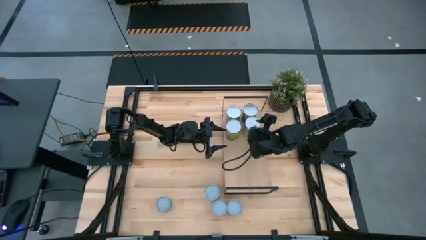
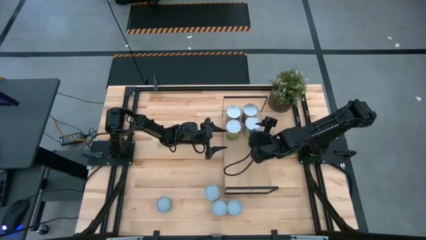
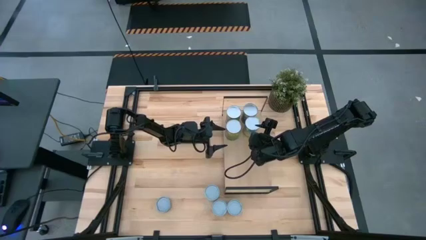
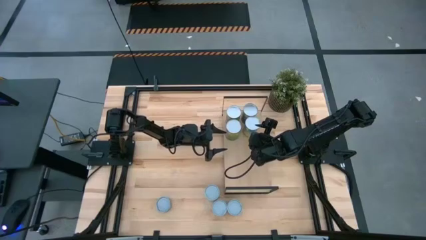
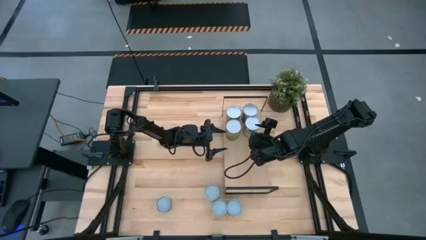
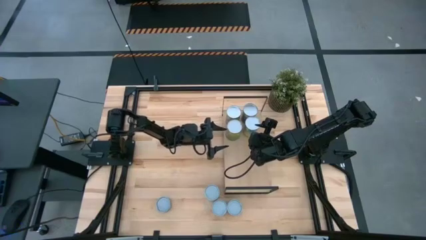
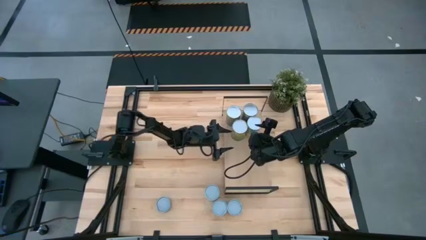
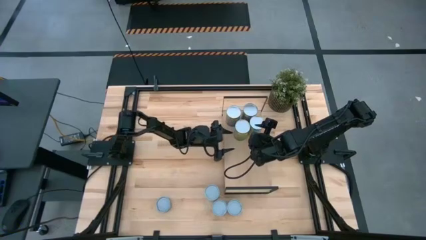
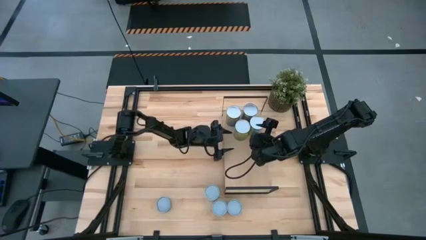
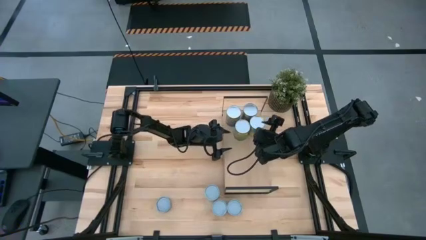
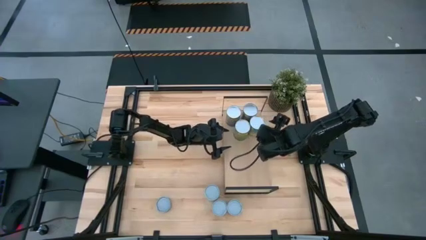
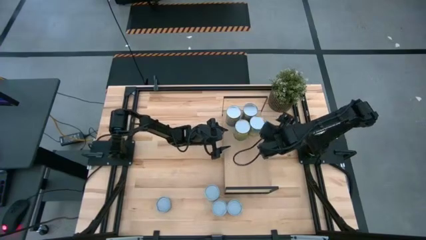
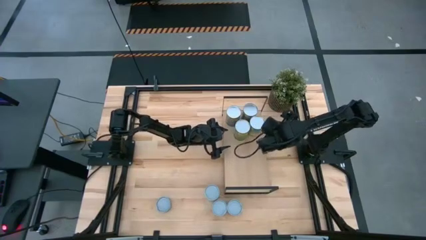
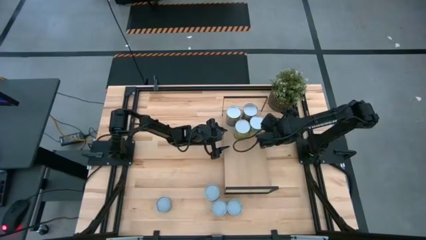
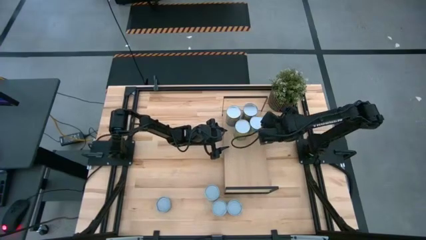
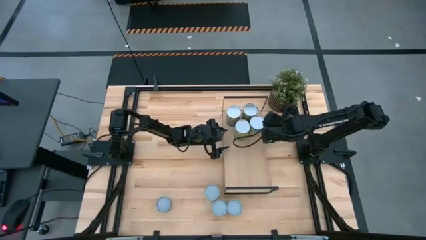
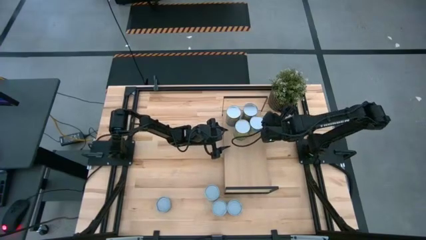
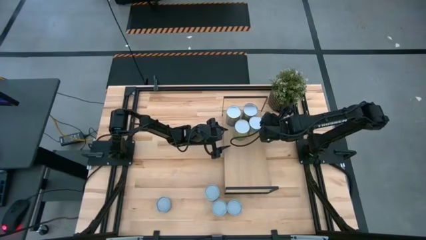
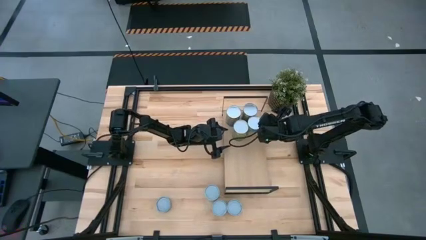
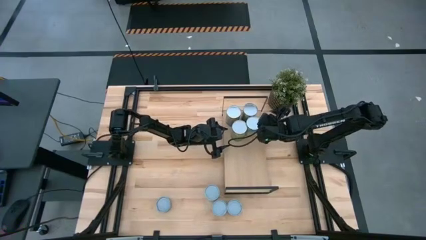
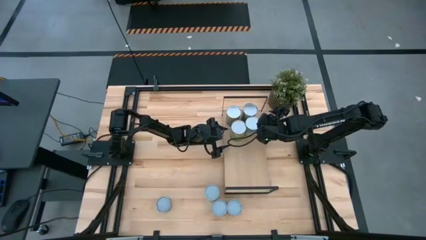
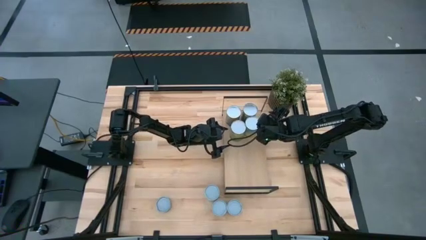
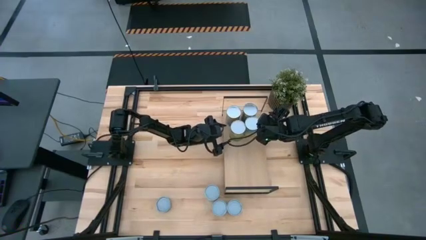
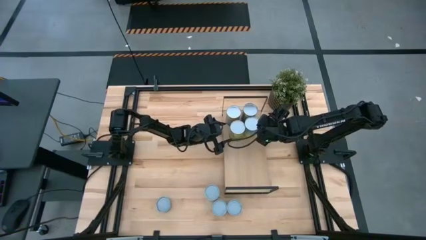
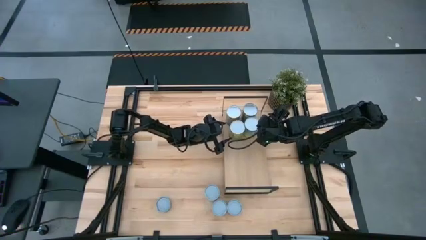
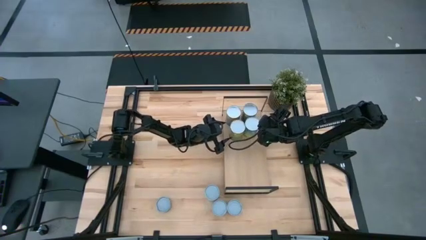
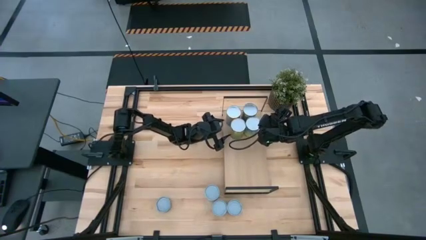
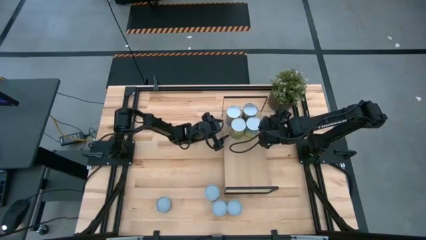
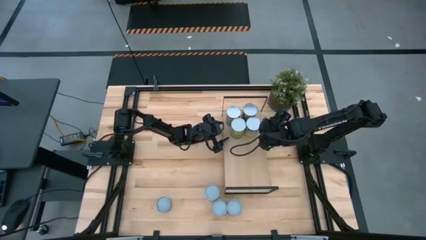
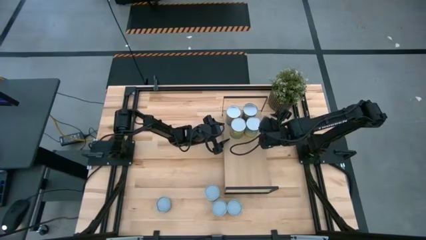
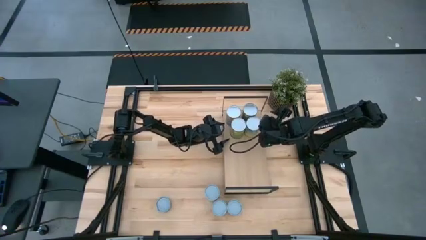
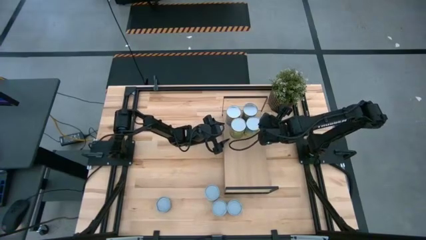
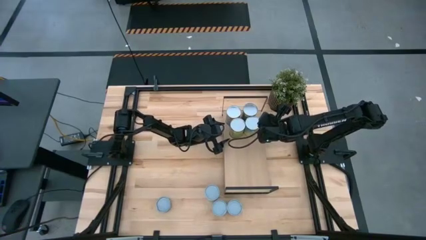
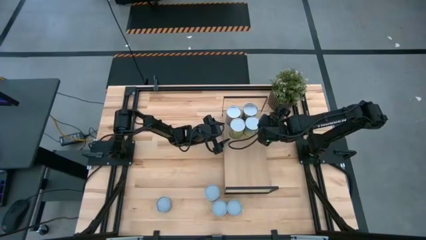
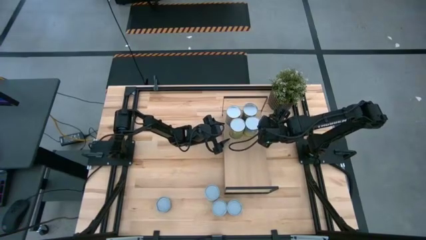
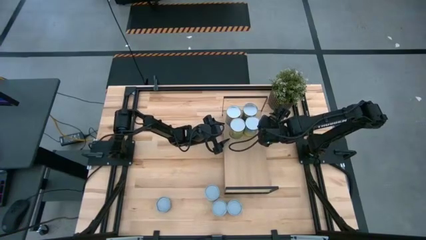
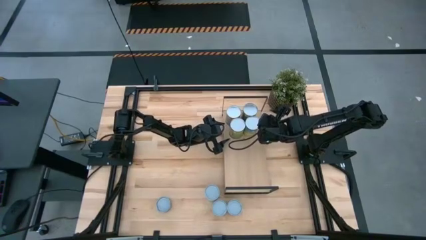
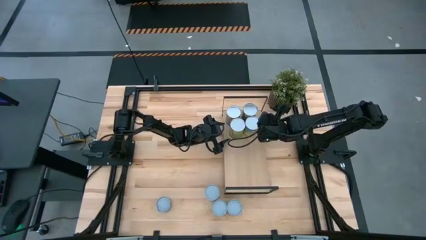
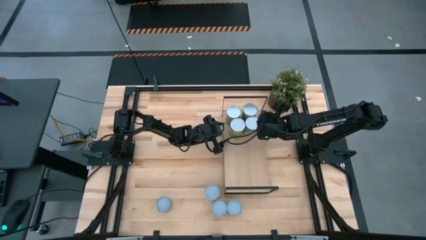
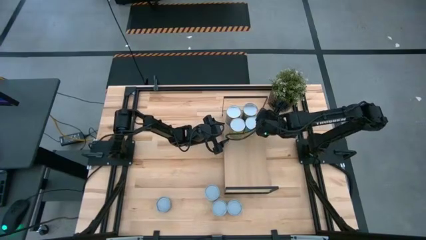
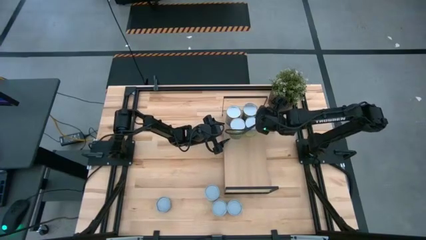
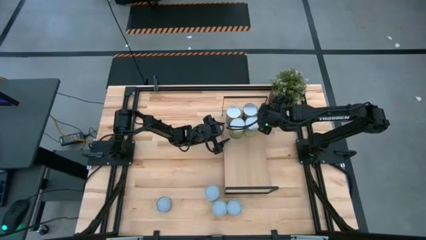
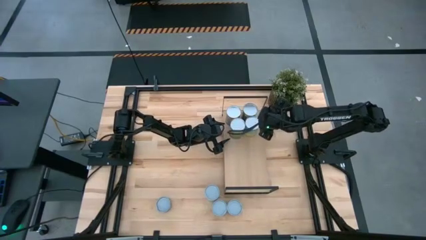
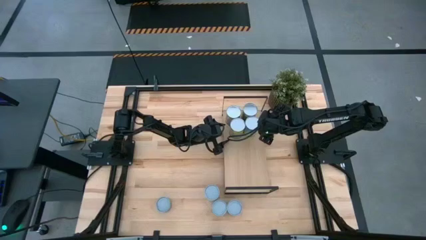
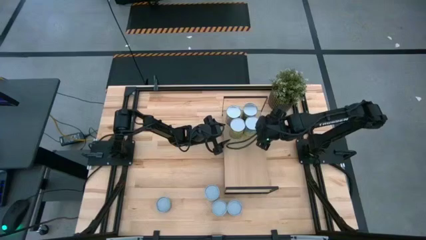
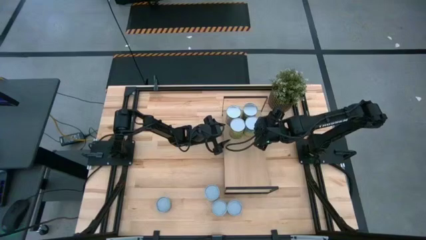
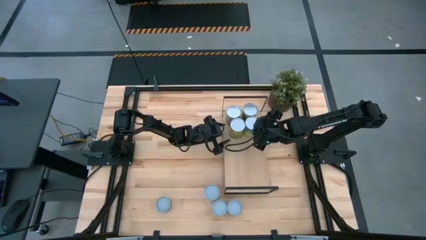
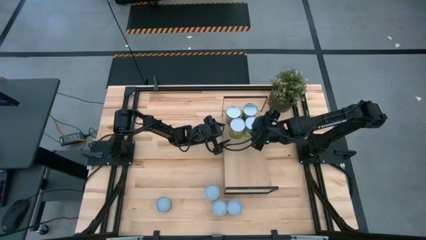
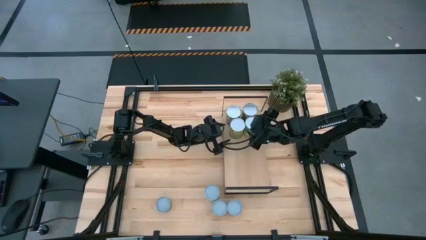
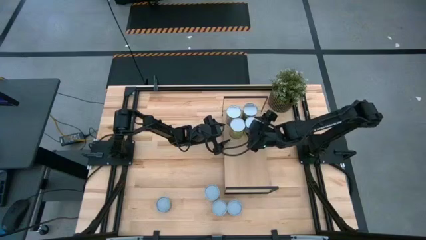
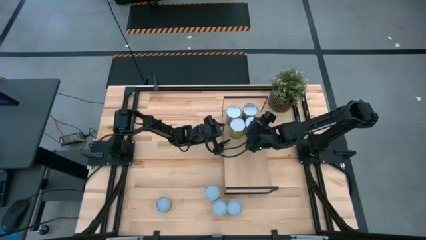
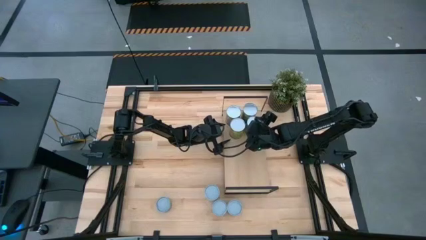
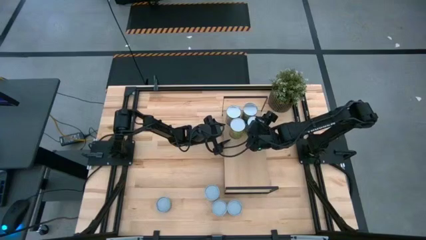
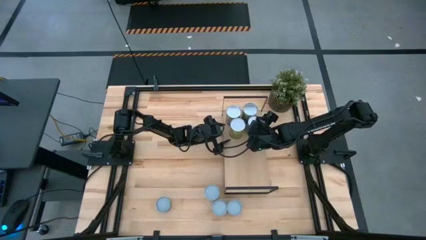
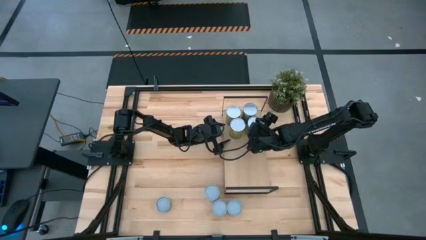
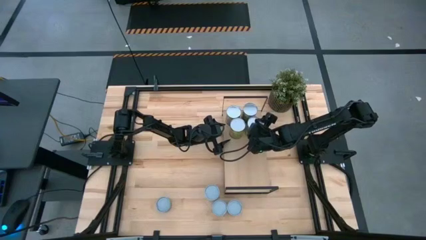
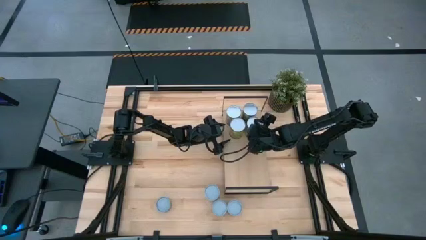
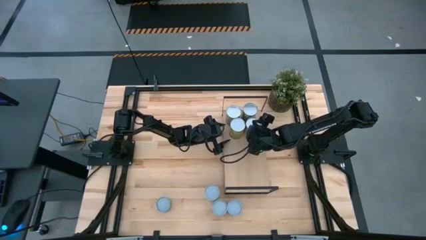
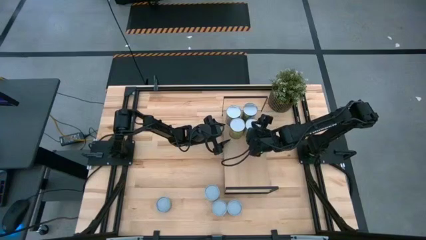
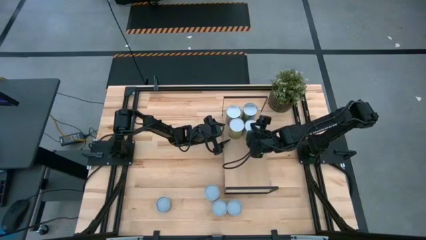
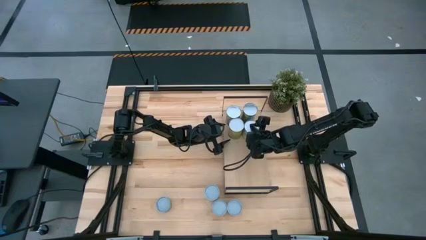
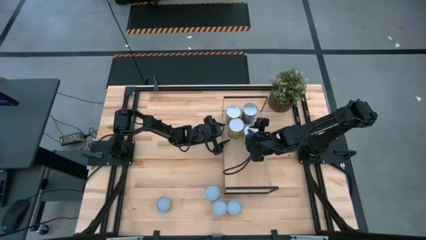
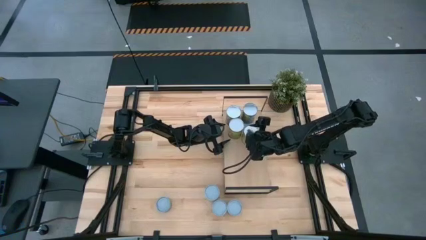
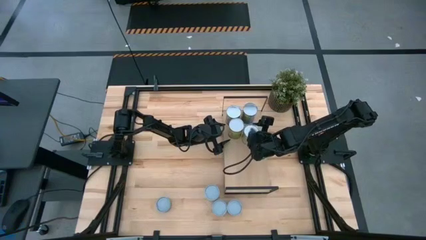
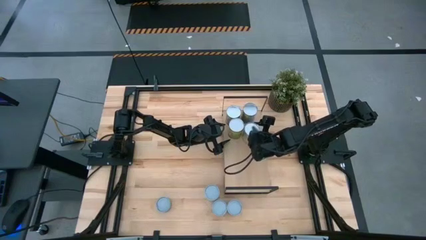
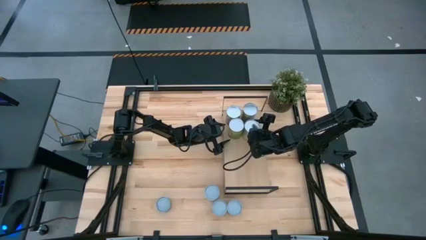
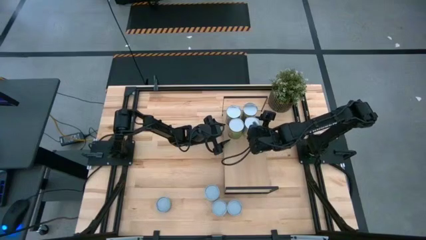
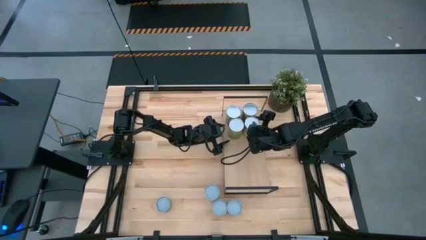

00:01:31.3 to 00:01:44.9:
Task: Pick and place cans onto a shelf
Adjust the canned oranges and carrots on the shelf
